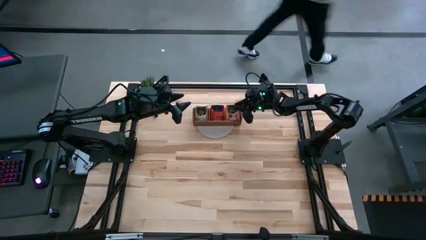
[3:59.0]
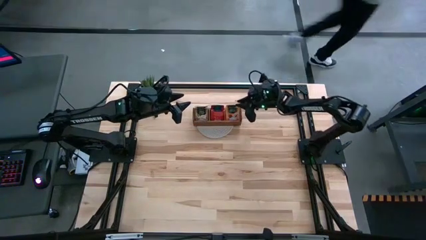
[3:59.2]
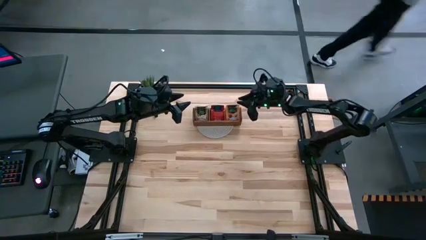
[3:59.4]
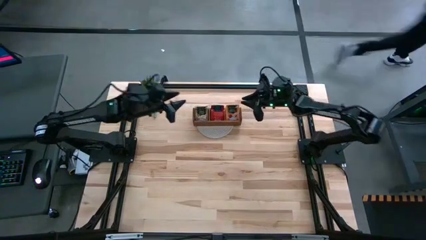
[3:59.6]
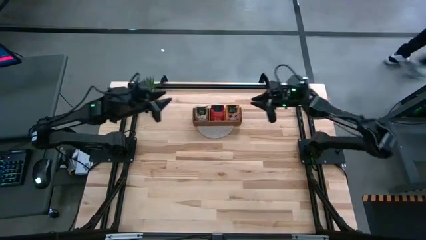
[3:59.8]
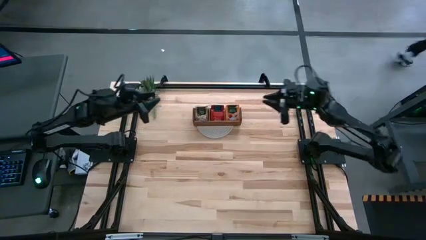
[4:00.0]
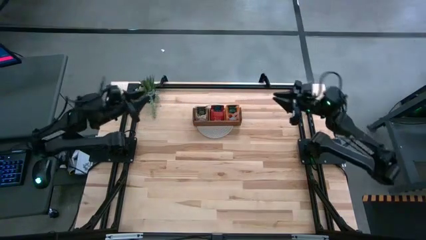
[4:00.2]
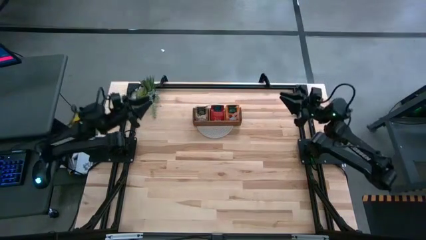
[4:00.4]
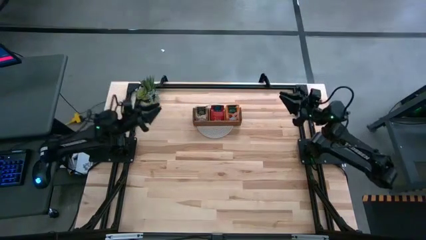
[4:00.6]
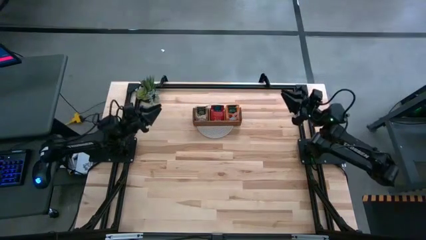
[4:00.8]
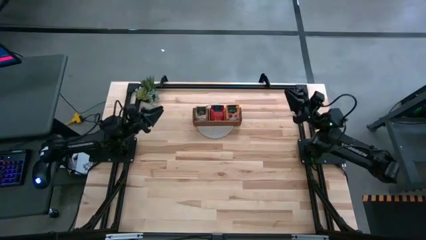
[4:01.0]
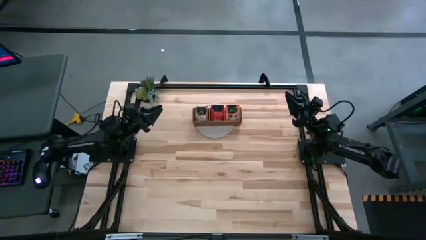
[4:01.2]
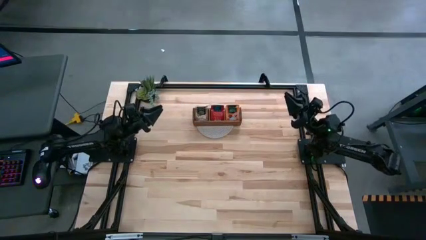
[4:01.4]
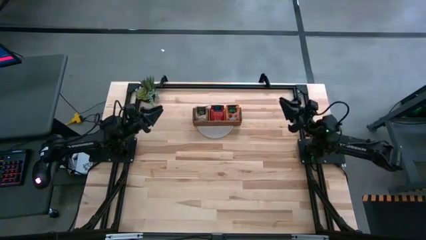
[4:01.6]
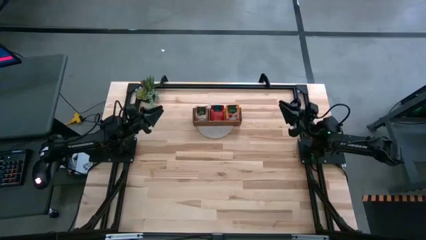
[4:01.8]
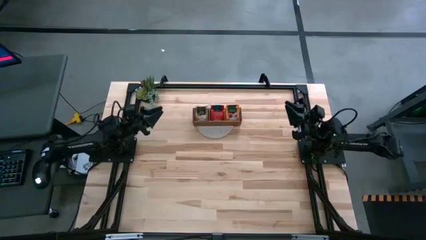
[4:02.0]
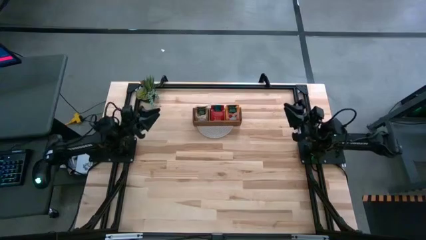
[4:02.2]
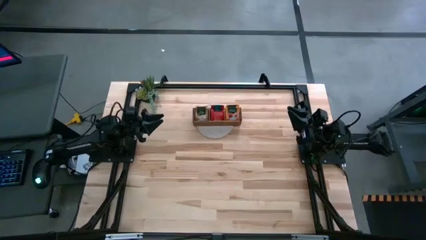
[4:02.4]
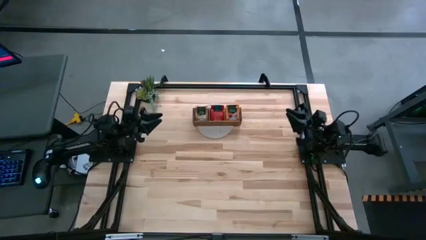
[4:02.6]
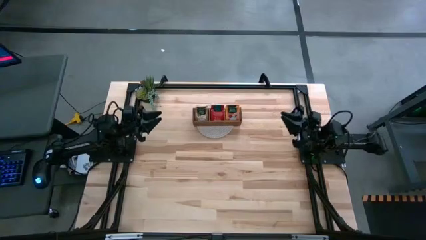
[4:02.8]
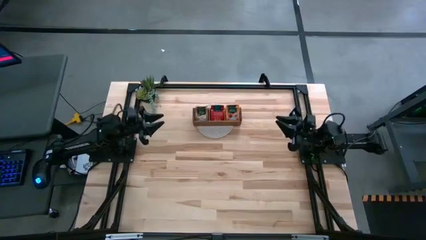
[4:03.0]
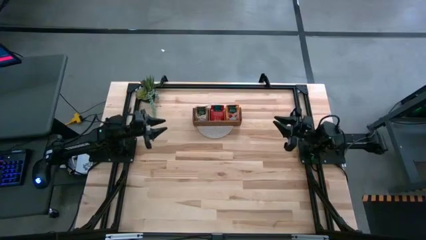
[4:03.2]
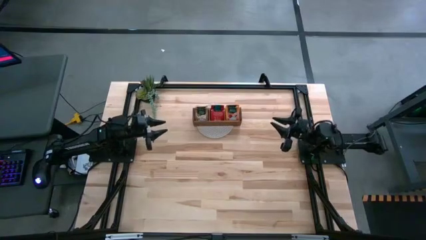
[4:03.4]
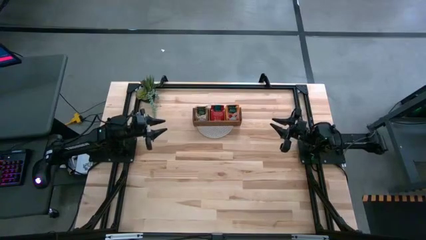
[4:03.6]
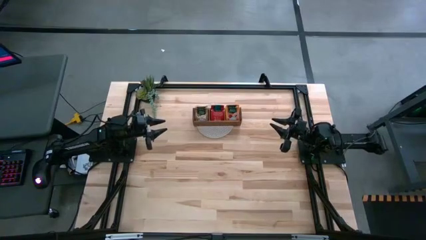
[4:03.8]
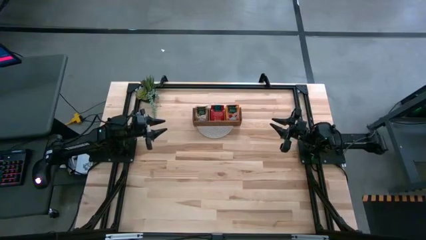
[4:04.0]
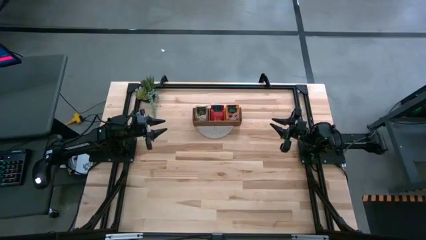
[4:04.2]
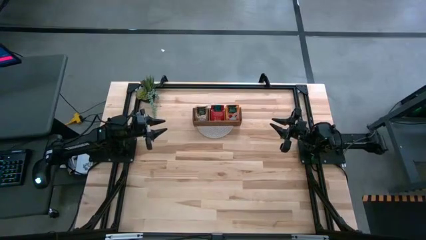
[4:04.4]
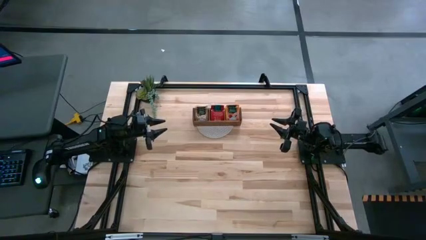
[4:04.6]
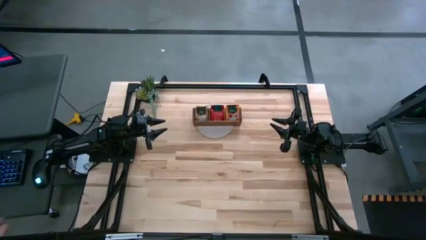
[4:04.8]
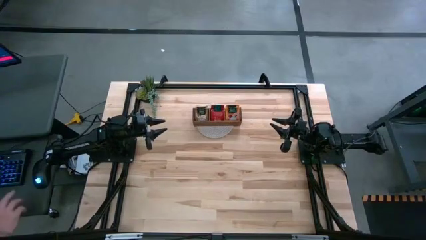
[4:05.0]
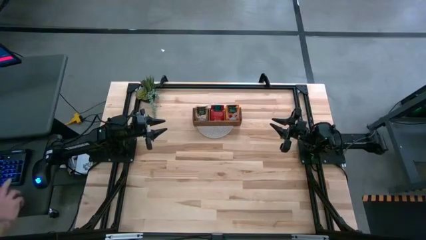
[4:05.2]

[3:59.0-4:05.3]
Task: Pick & Place Tea
Return to Home Position

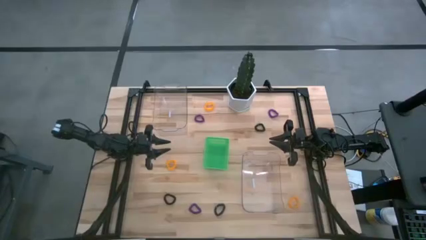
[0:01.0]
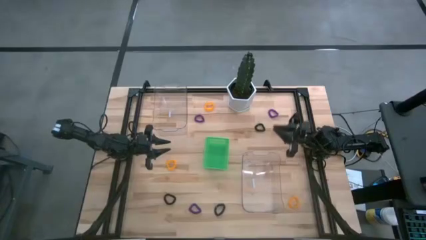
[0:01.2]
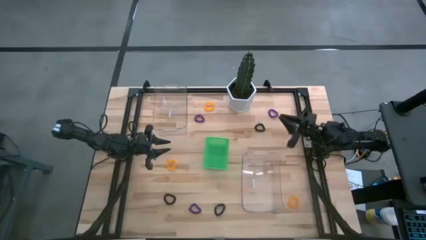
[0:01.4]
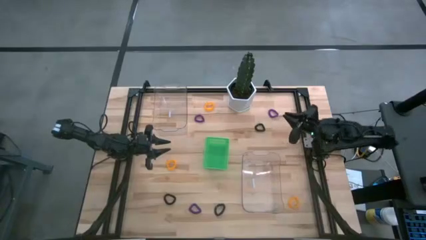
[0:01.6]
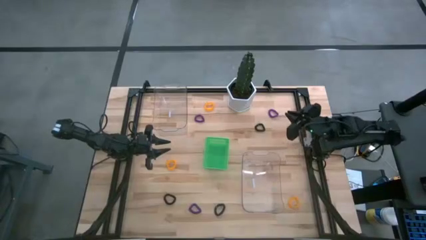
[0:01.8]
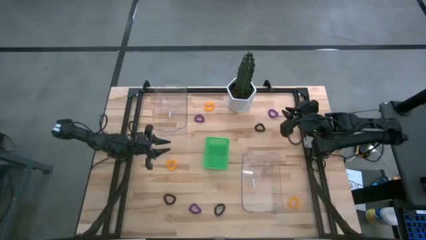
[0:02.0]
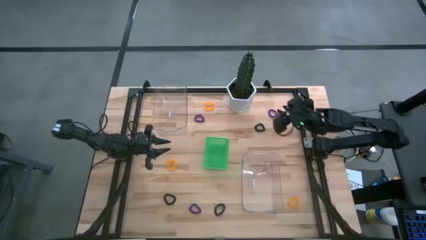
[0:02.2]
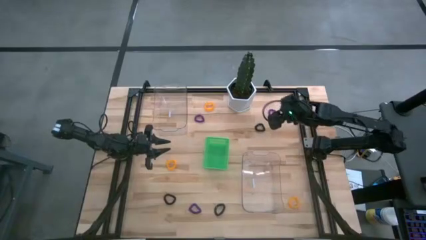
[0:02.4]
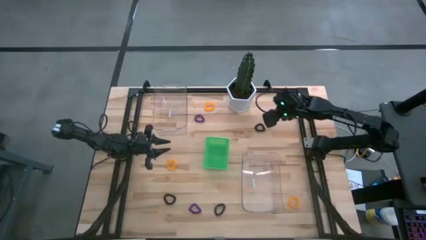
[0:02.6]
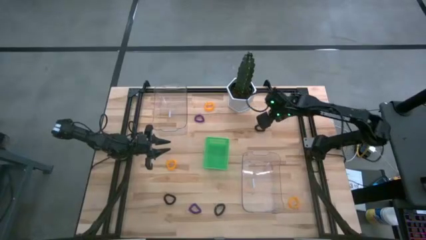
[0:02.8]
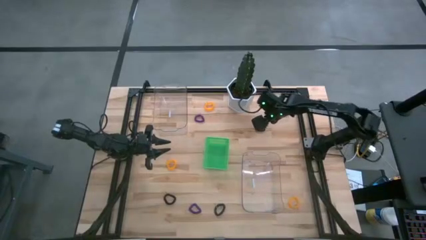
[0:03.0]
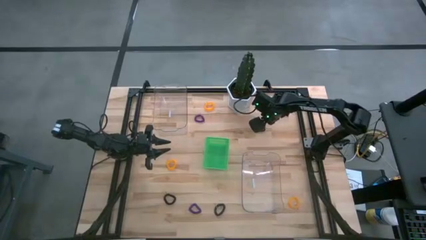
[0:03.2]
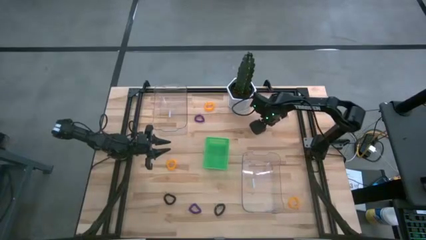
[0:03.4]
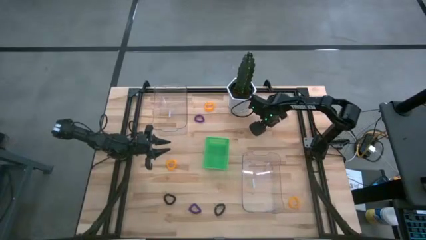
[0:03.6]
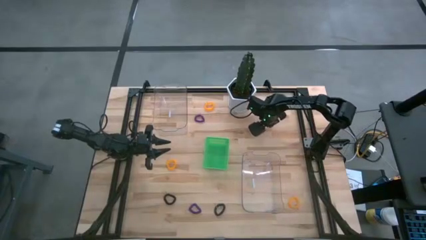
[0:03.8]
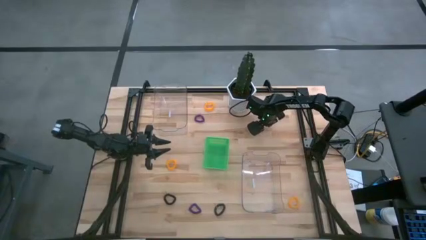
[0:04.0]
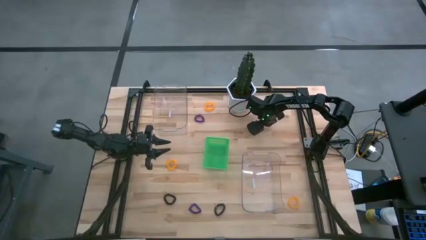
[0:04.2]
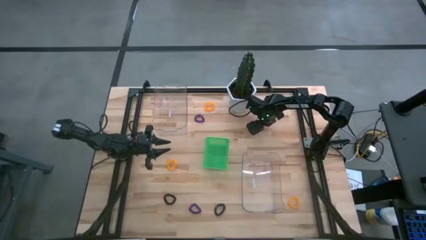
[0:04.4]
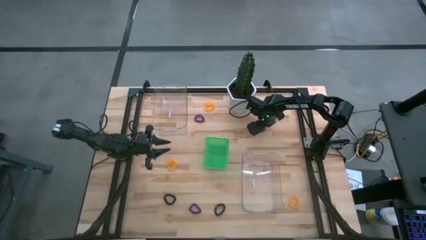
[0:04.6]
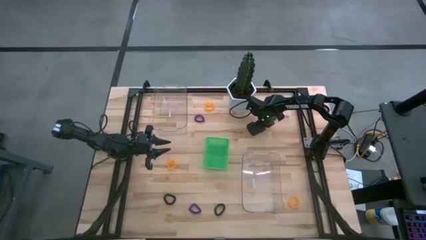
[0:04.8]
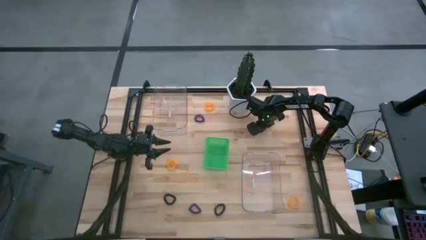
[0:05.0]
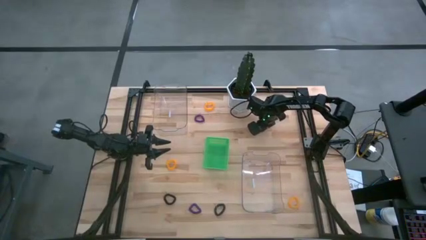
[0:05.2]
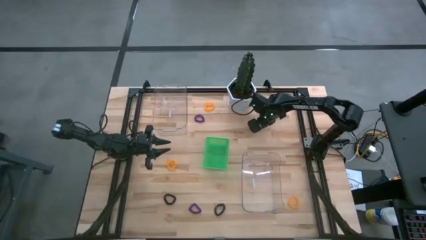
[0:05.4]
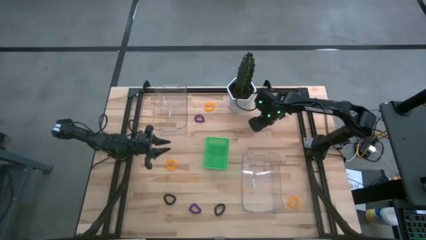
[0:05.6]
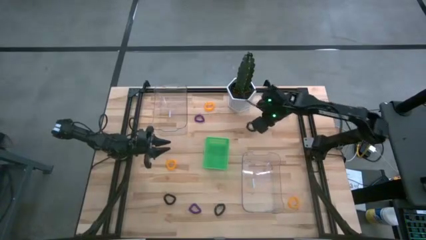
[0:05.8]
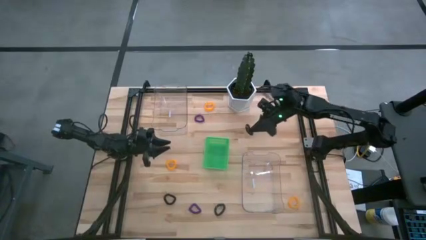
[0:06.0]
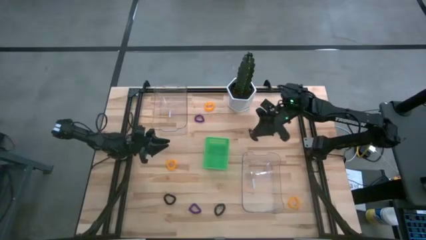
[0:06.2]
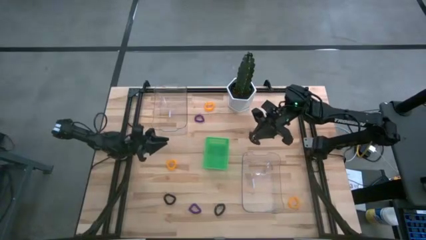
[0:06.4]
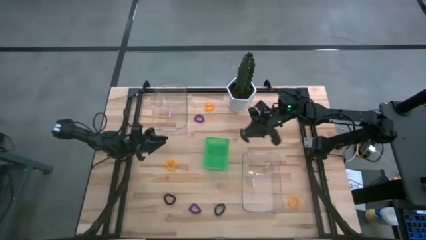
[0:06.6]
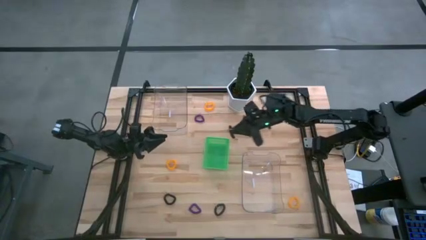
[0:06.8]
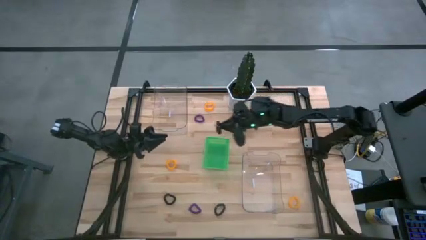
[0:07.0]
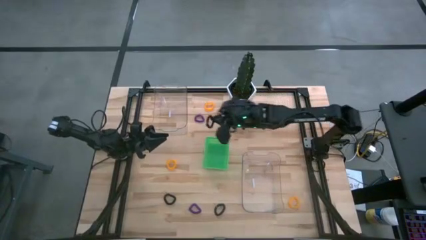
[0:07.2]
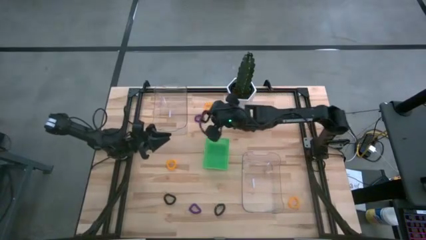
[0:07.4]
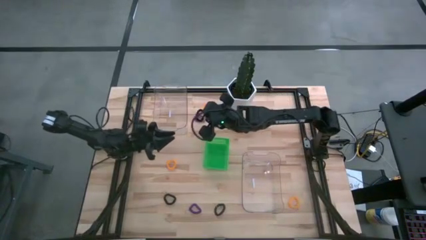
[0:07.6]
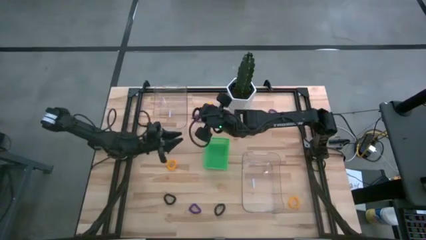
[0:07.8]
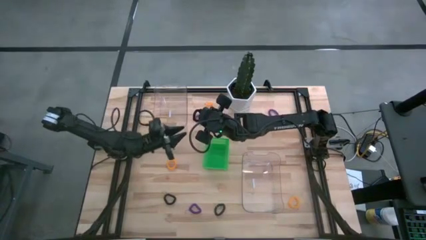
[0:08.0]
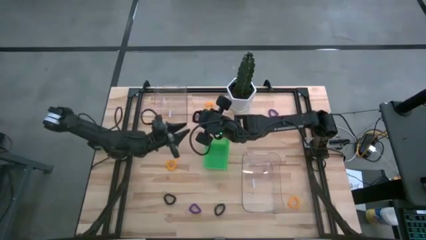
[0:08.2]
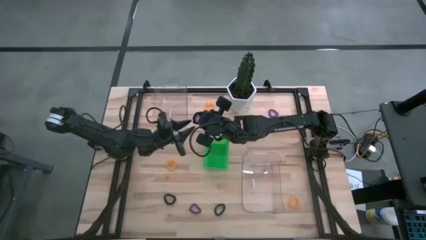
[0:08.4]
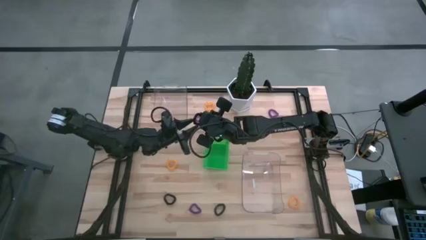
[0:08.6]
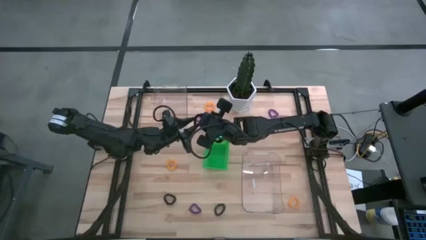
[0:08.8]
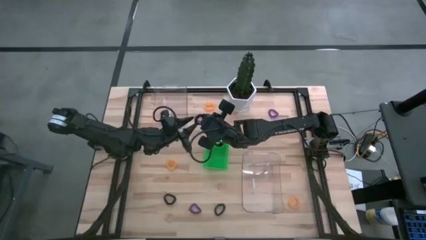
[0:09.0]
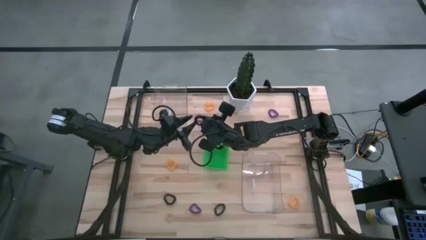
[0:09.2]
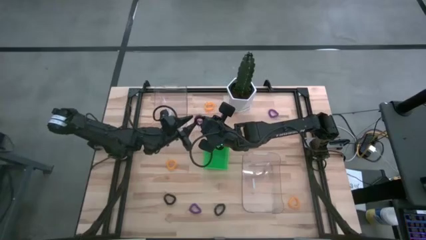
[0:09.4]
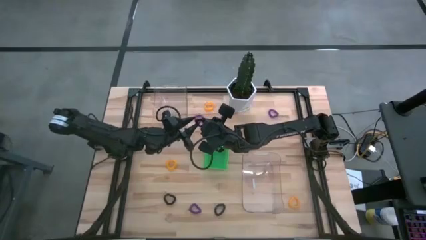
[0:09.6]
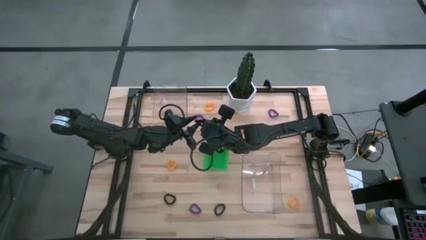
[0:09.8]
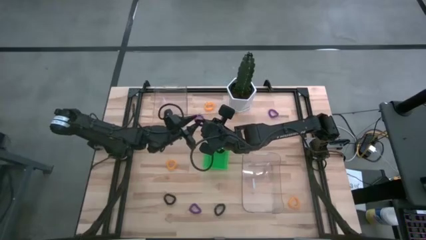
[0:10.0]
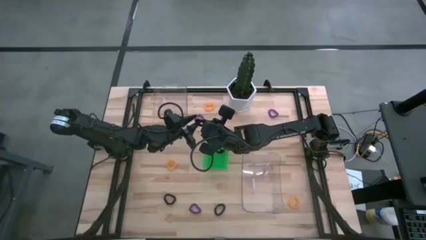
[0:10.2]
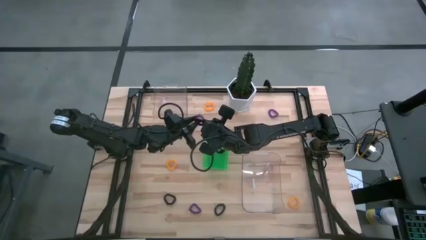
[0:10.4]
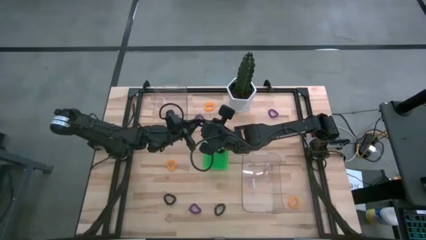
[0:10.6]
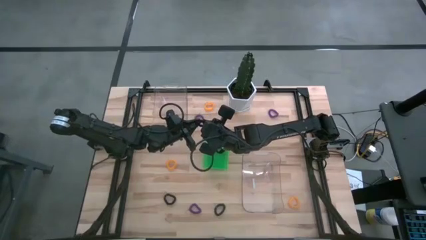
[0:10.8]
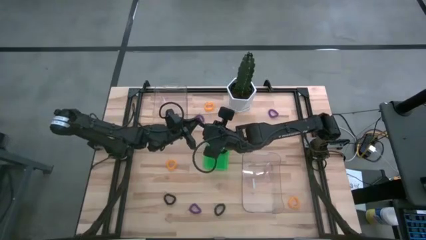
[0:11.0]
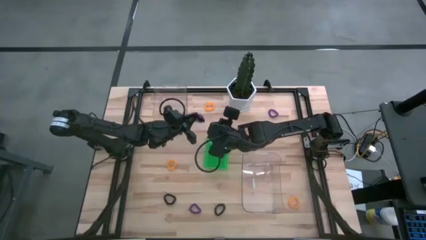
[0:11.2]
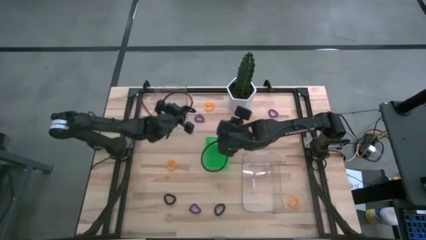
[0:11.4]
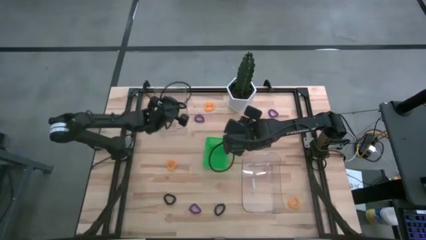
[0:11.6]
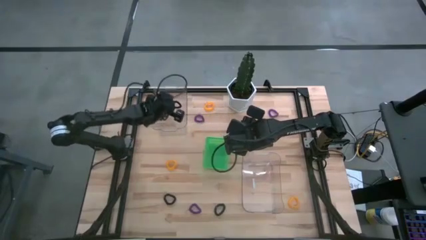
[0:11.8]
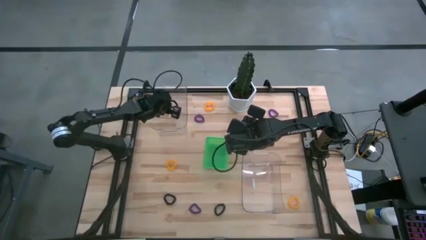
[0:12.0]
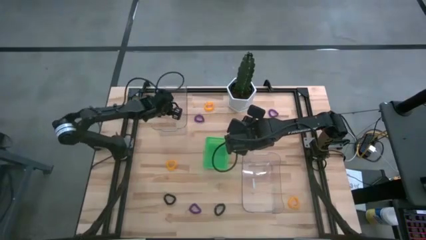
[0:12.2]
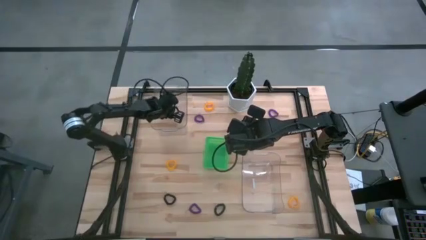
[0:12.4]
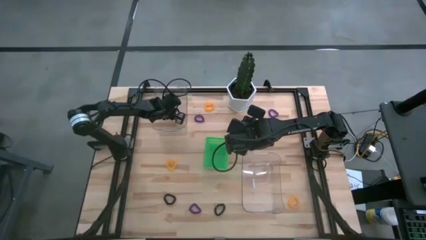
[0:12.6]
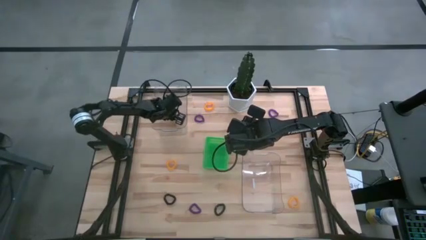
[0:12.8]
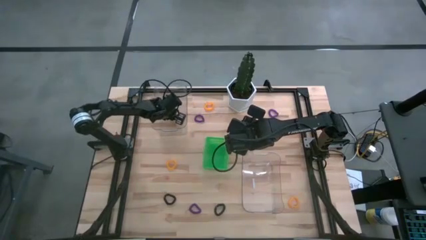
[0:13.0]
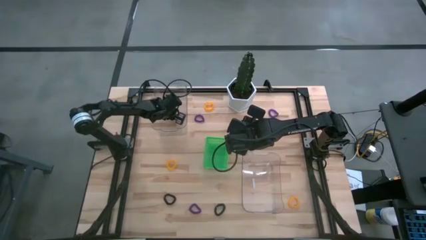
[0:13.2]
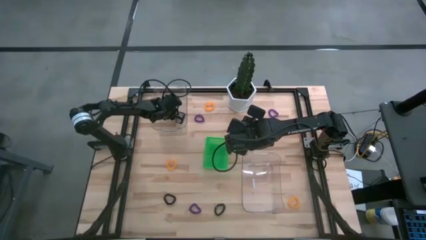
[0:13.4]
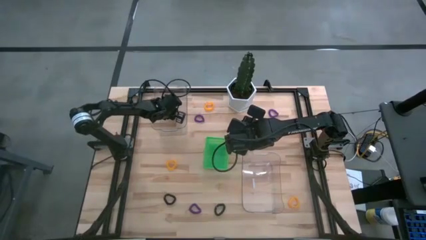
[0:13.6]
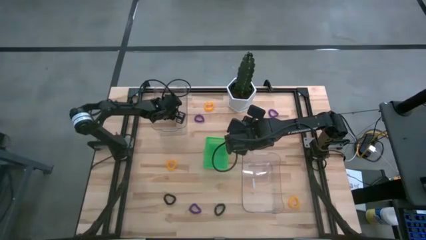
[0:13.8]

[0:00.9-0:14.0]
Task: Sort spring keychains
Put the top black spring keychain into the top transparent bin
